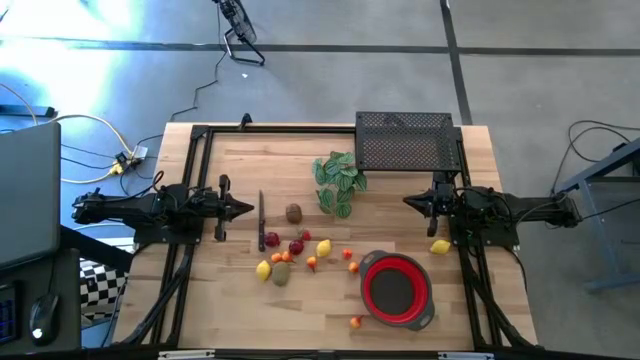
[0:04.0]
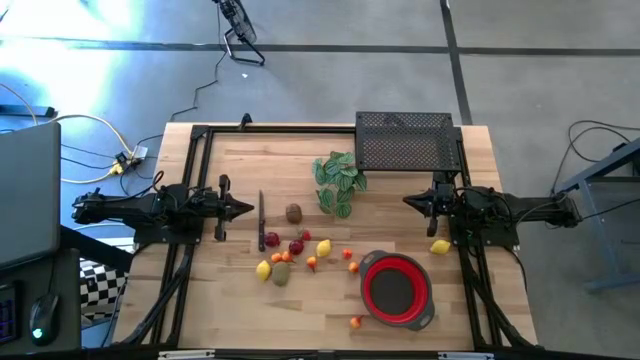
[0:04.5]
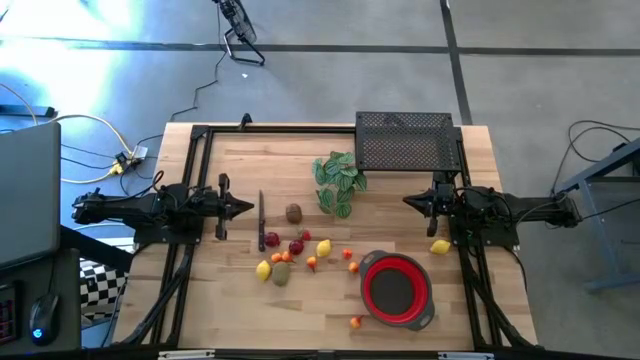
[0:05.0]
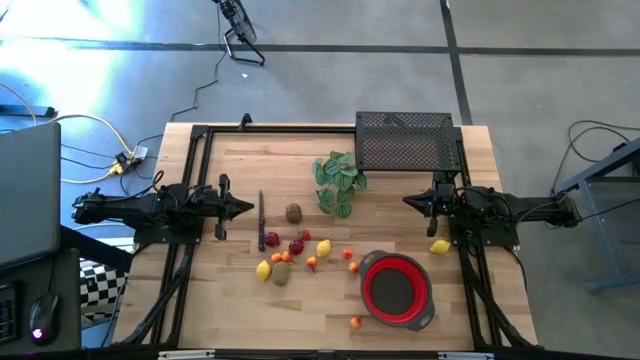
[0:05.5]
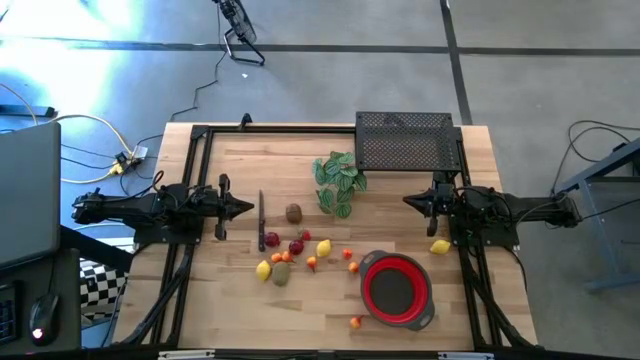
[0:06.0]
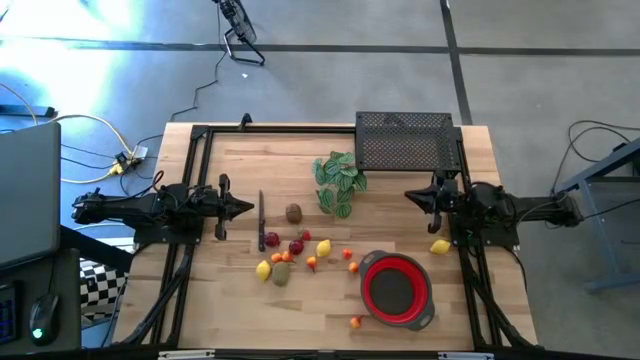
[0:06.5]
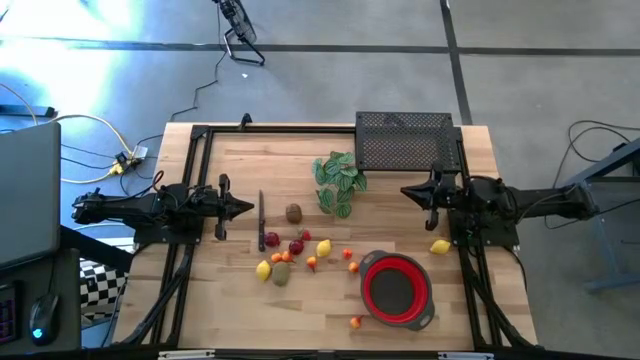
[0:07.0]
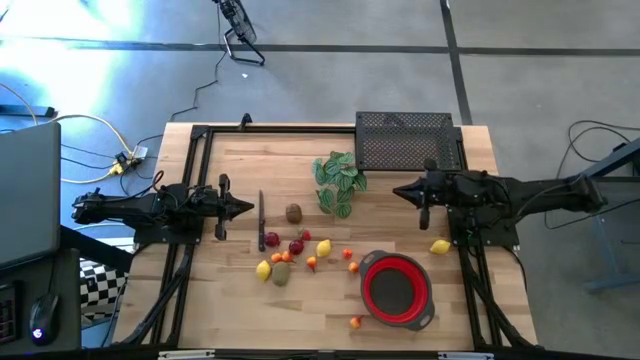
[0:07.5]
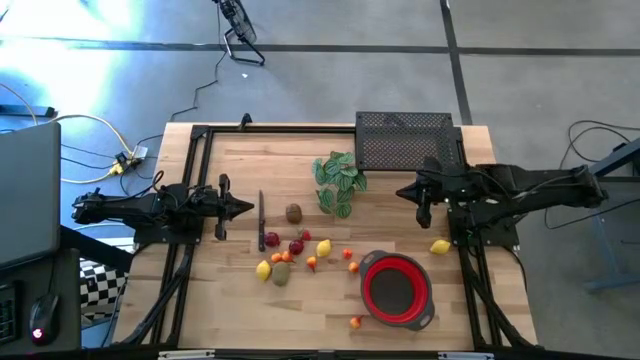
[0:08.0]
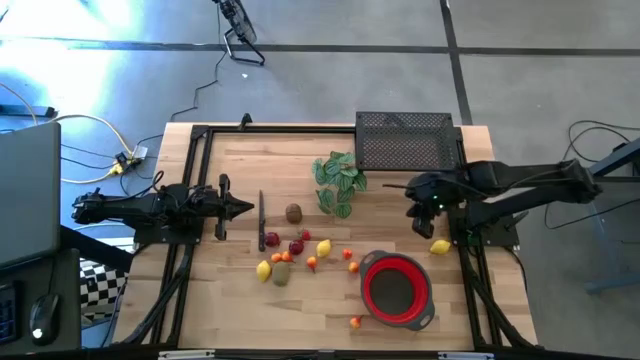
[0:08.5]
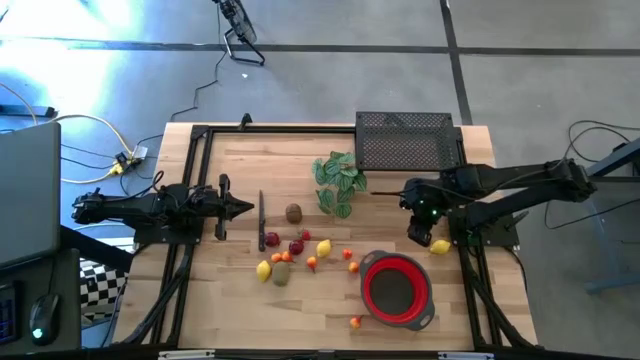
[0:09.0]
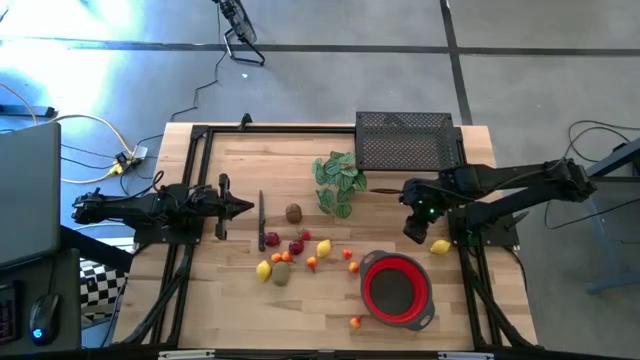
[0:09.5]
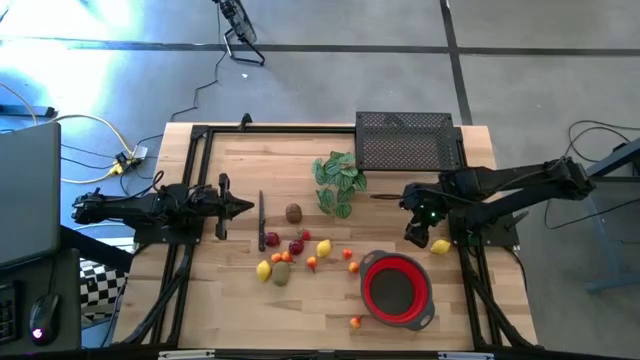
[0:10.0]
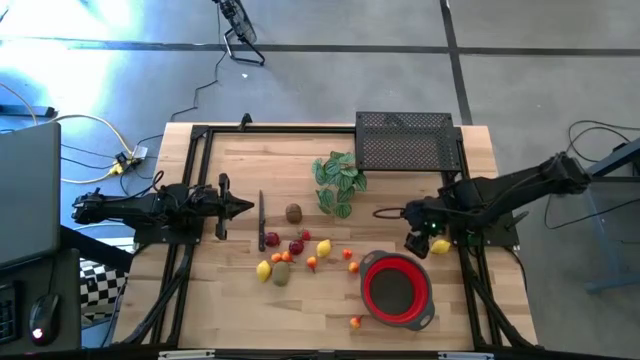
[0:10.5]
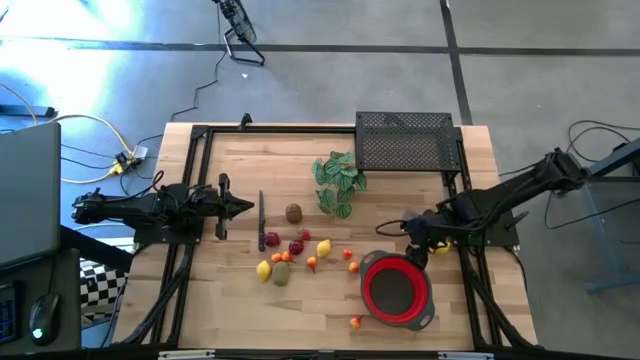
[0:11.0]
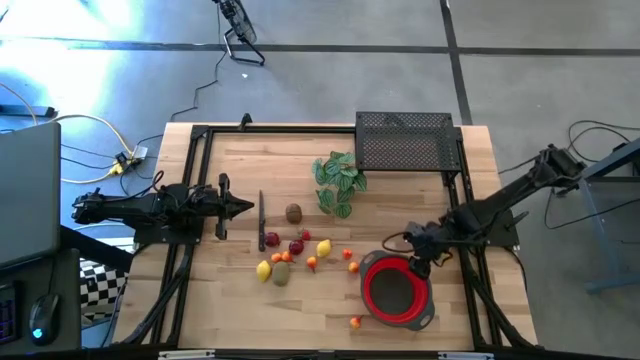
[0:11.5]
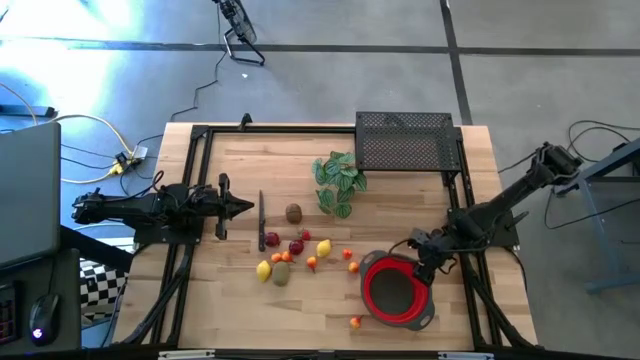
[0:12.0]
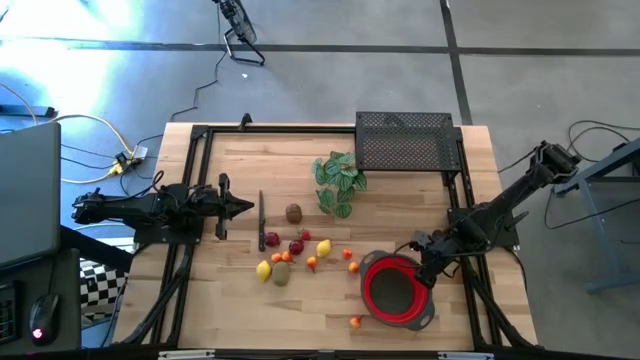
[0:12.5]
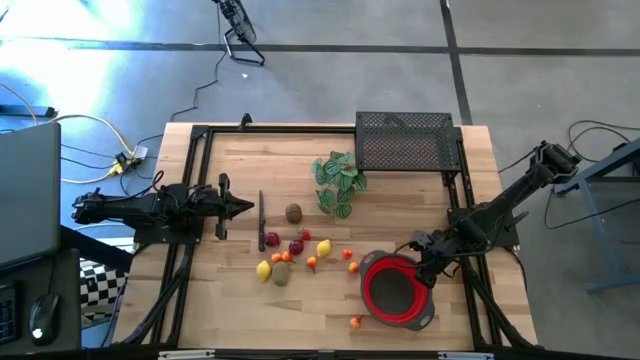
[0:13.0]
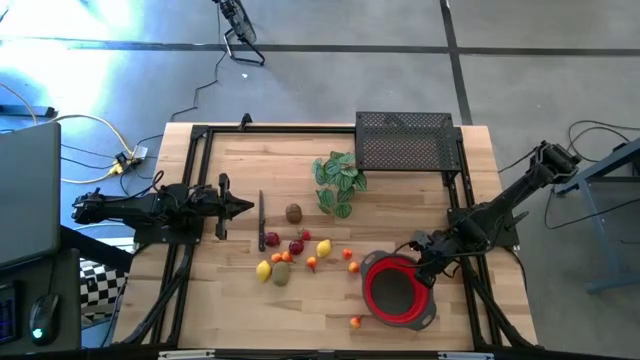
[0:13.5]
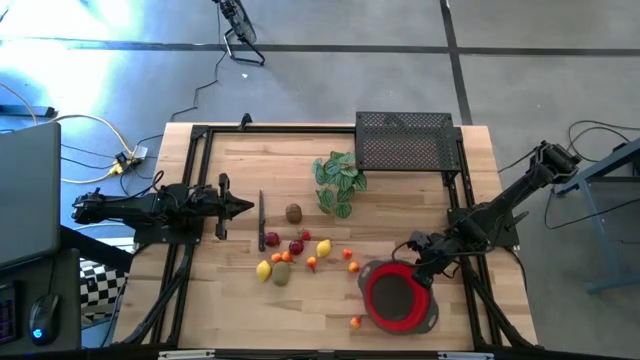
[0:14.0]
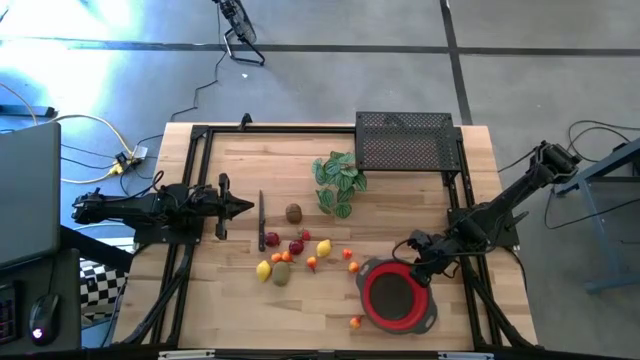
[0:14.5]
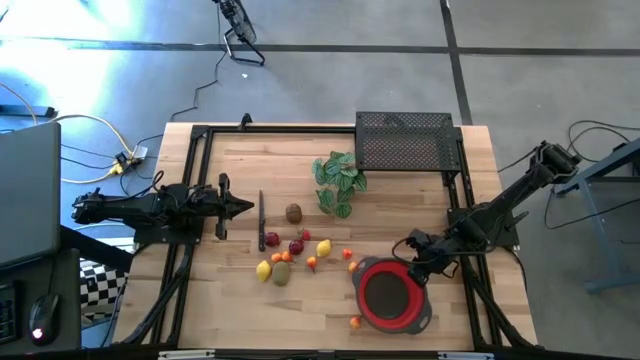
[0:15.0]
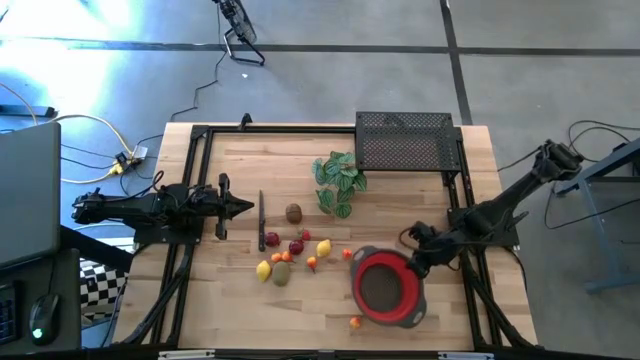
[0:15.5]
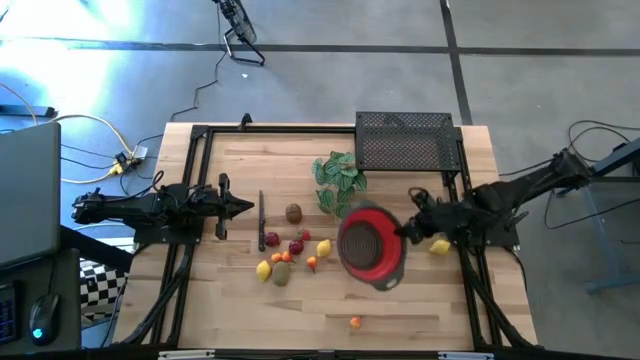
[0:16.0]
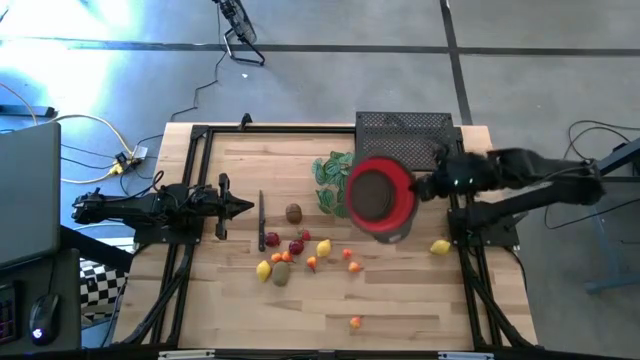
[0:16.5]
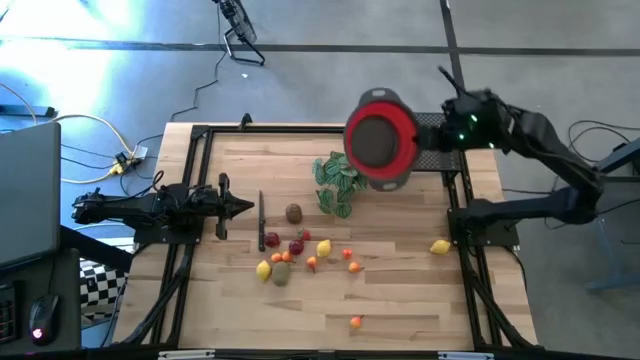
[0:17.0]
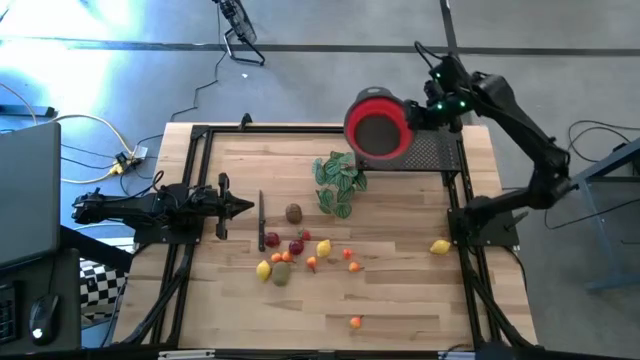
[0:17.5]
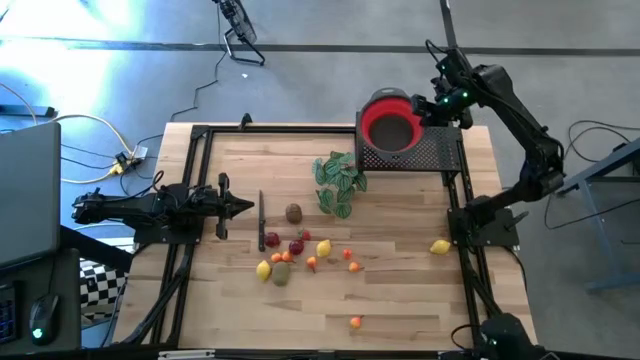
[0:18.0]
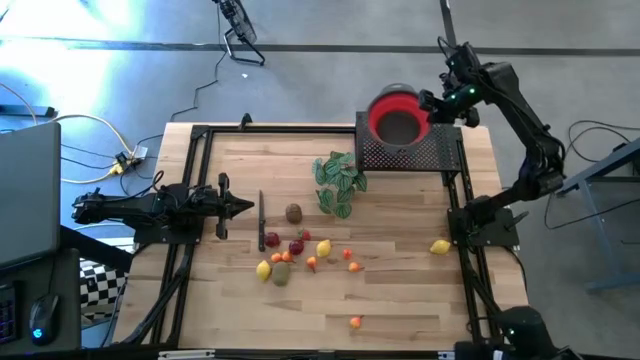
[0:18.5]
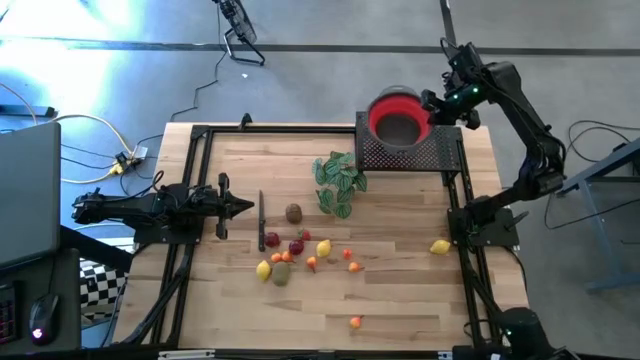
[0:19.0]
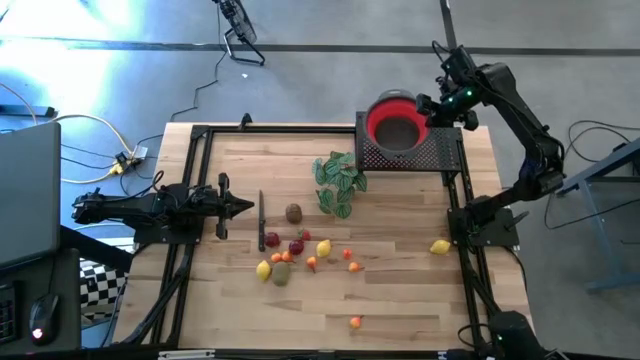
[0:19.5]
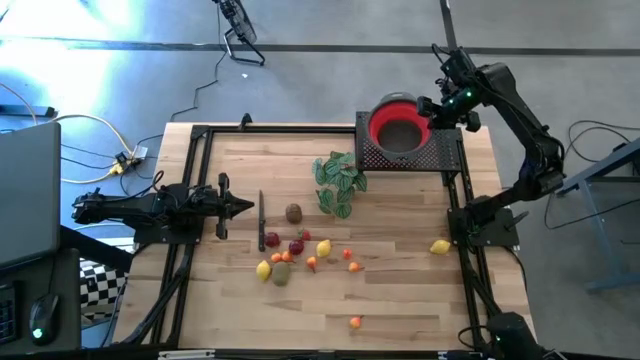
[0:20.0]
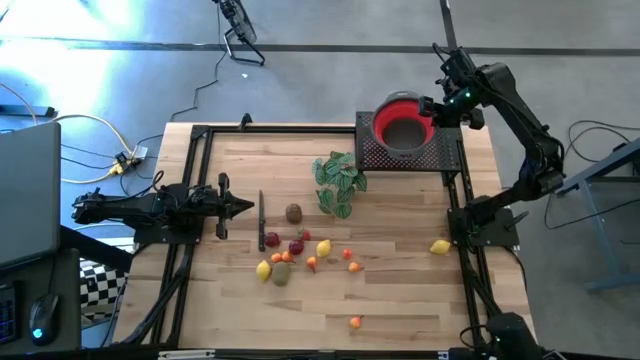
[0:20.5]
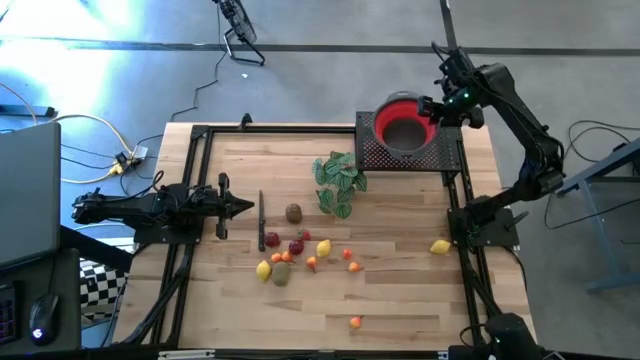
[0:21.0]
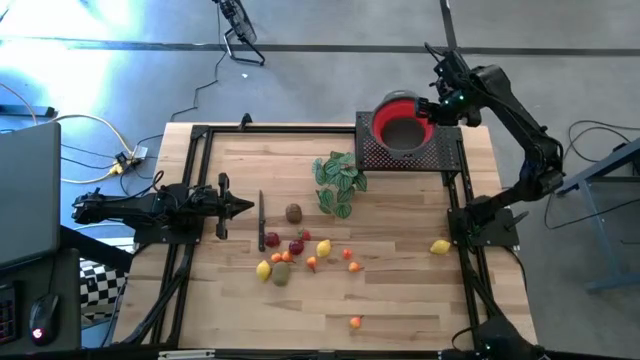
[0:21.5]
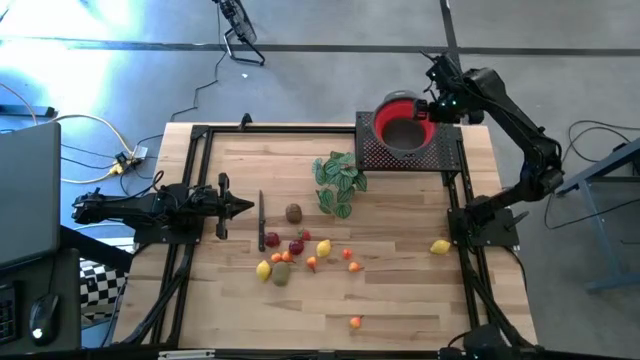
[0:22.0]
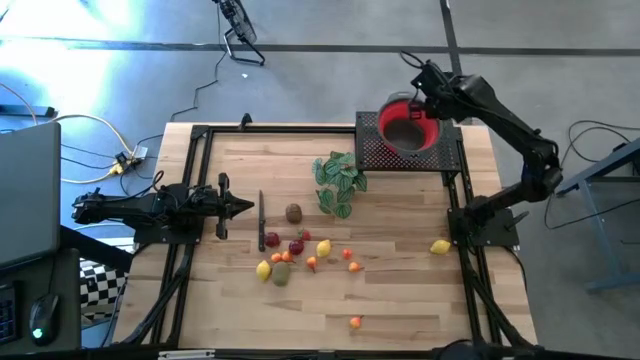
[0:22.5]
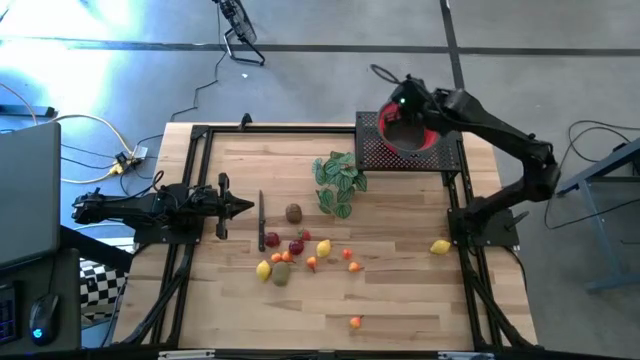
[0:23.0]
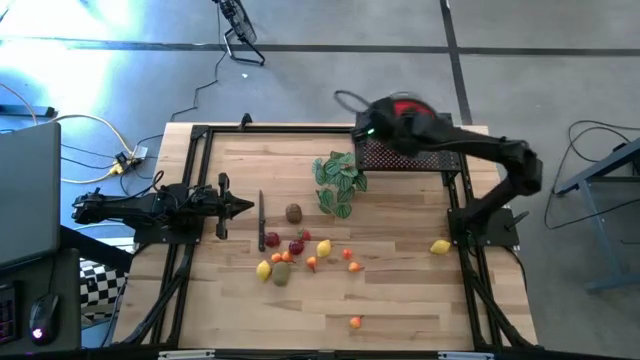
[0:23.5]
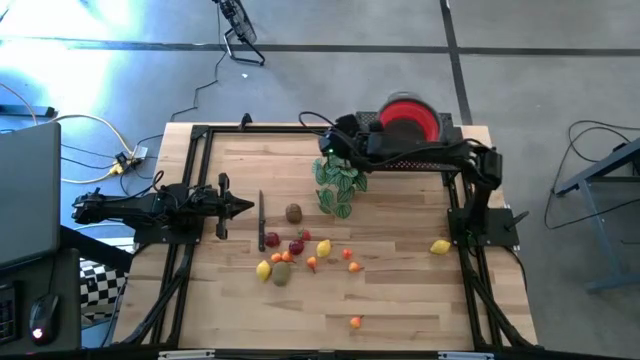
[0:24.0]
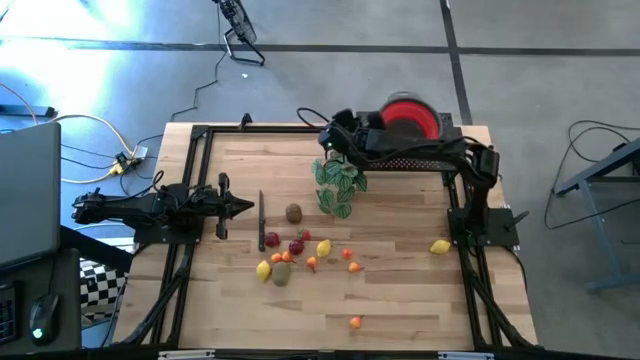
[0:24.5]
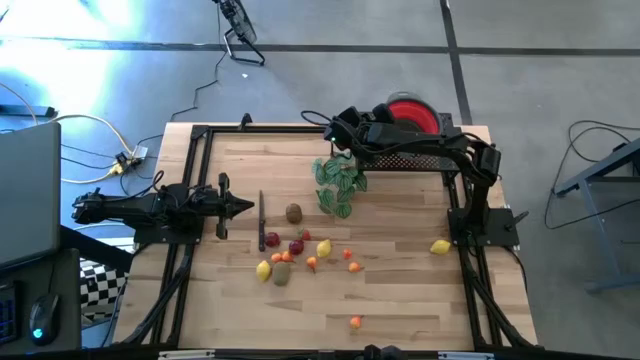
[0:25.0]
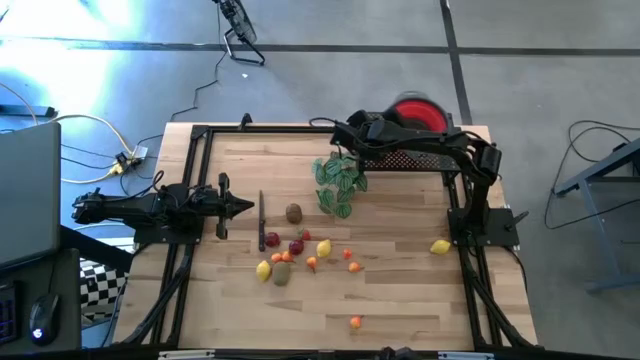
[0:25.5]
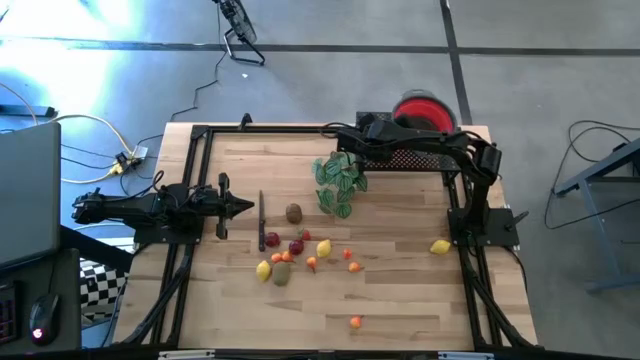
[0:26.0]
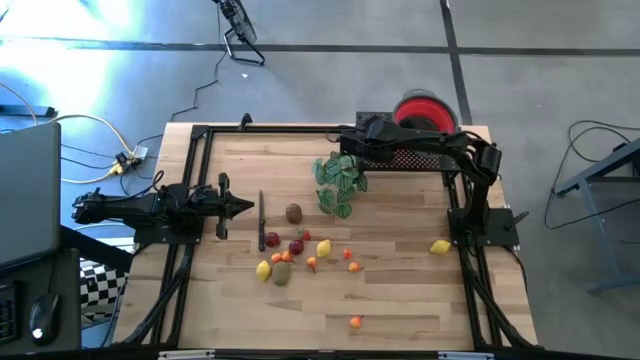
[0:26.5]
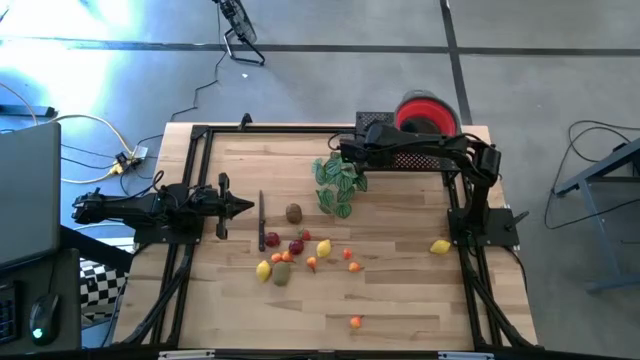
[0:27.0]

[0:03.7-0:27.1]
Task: Pick & Place Fruit
Put the red colander on the shelf
